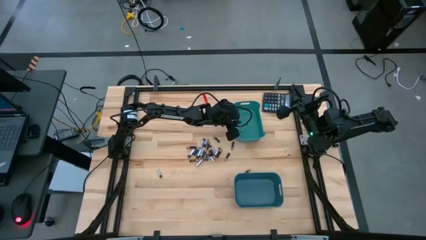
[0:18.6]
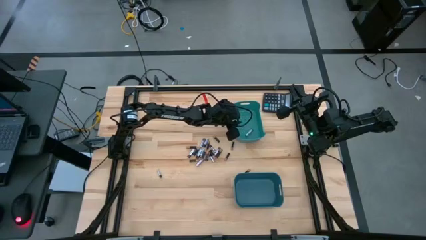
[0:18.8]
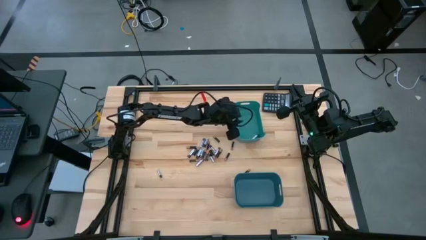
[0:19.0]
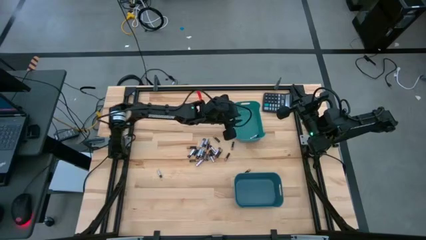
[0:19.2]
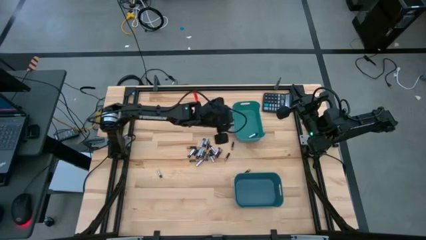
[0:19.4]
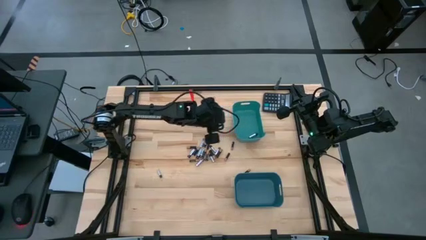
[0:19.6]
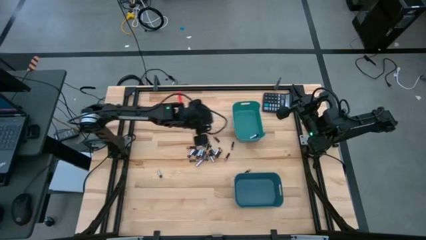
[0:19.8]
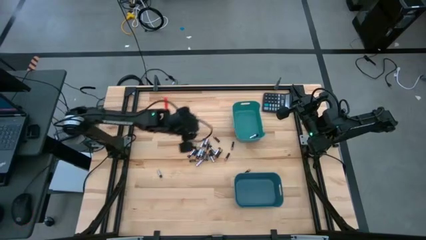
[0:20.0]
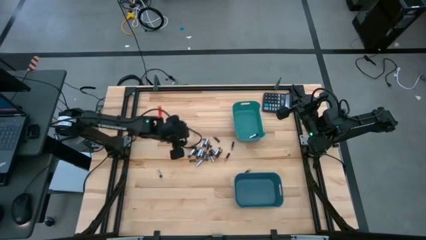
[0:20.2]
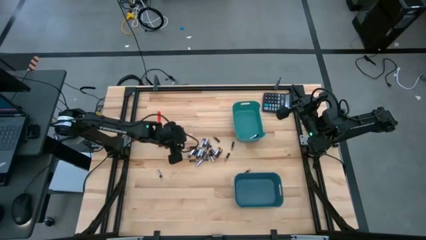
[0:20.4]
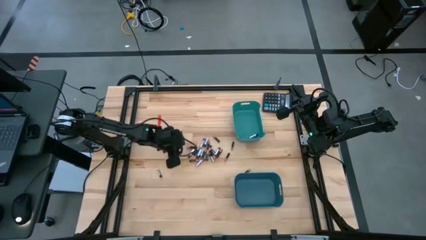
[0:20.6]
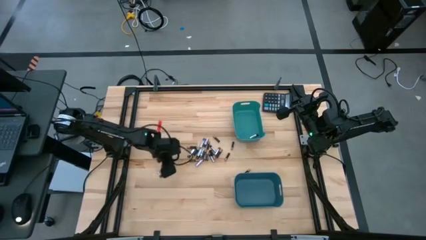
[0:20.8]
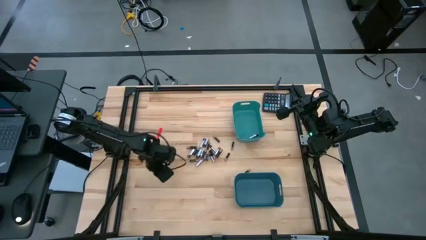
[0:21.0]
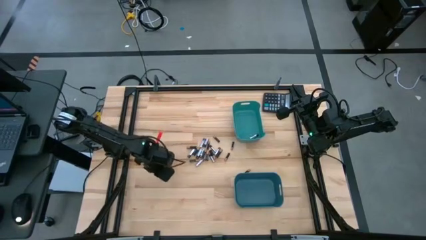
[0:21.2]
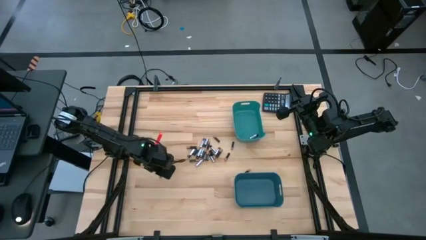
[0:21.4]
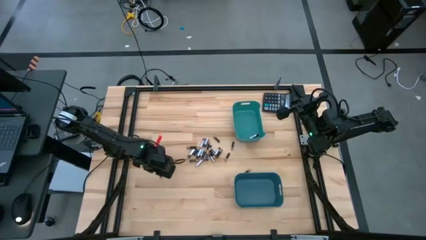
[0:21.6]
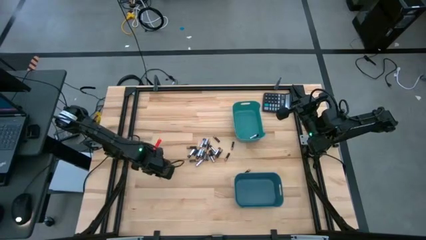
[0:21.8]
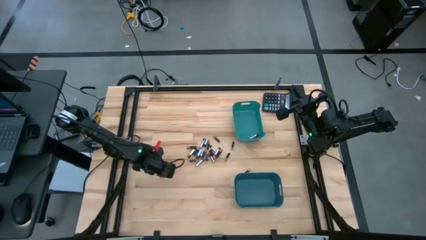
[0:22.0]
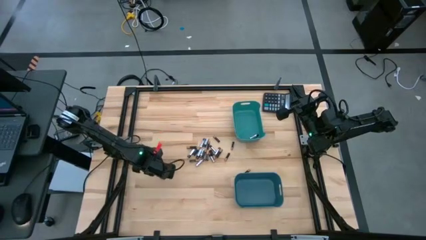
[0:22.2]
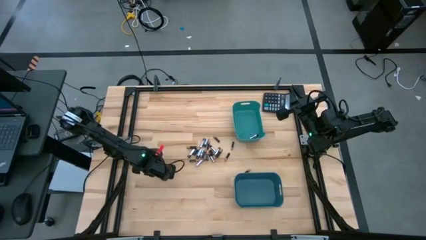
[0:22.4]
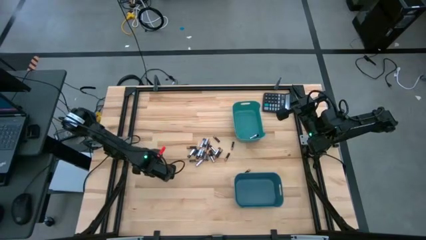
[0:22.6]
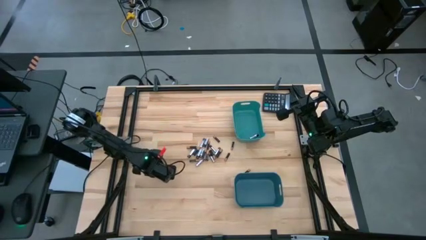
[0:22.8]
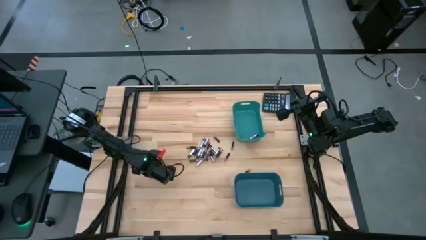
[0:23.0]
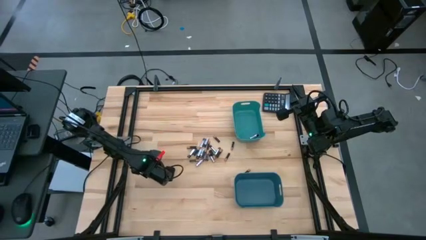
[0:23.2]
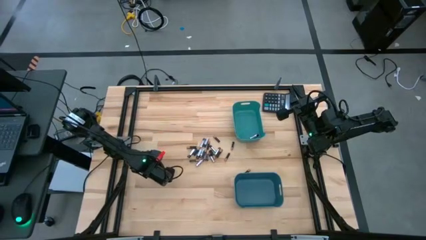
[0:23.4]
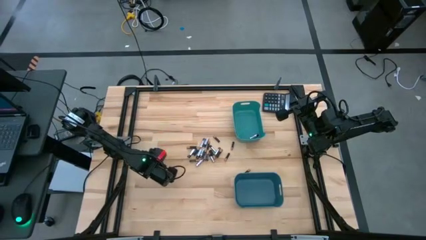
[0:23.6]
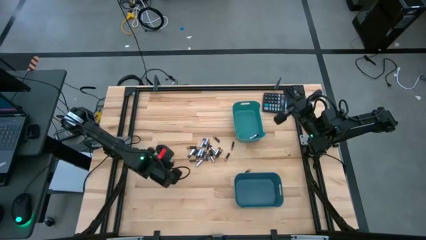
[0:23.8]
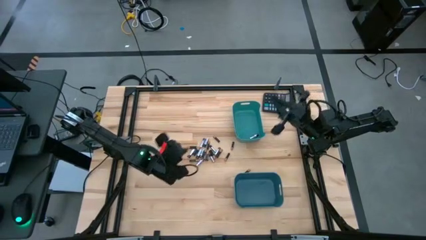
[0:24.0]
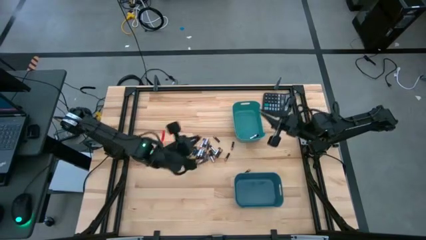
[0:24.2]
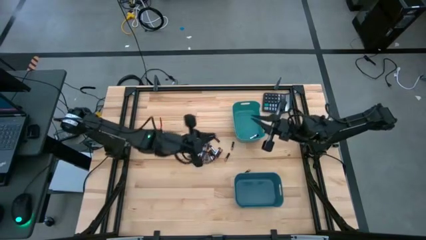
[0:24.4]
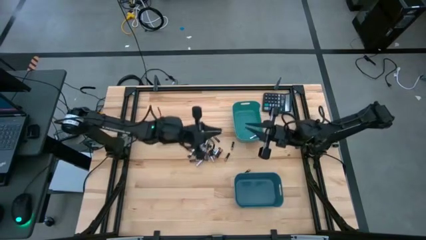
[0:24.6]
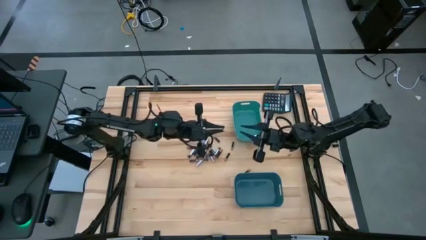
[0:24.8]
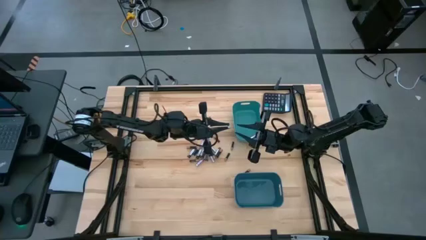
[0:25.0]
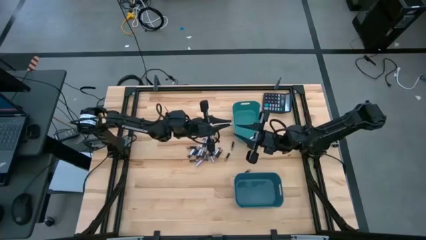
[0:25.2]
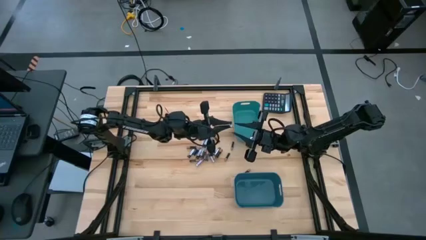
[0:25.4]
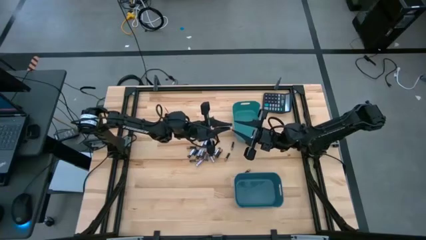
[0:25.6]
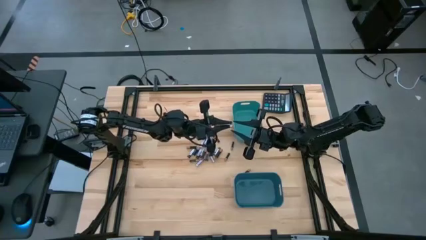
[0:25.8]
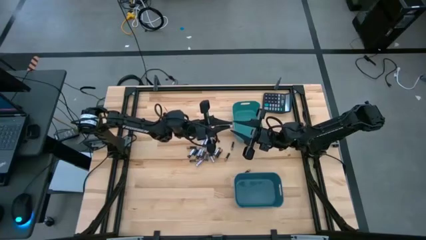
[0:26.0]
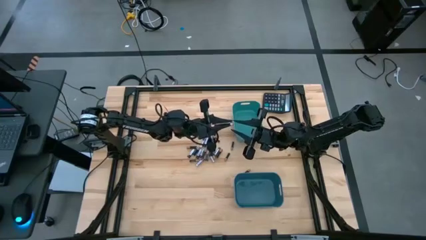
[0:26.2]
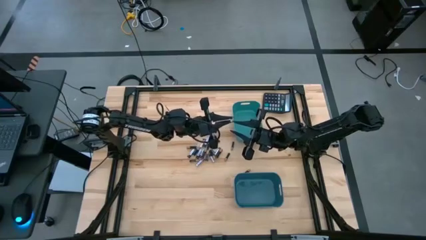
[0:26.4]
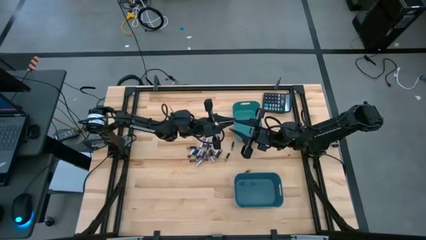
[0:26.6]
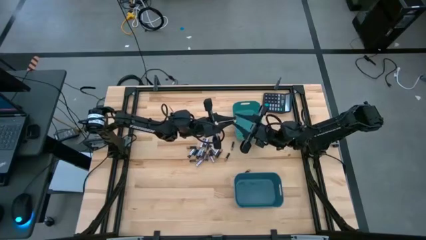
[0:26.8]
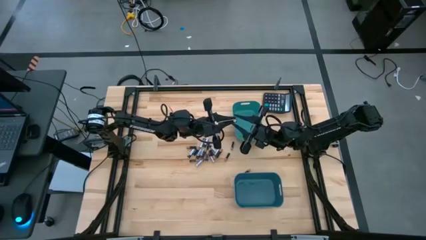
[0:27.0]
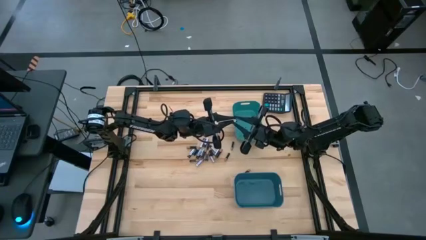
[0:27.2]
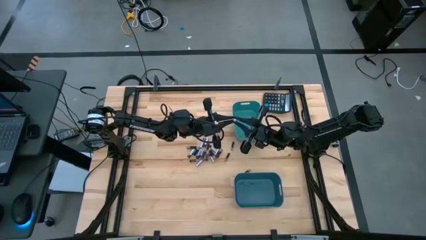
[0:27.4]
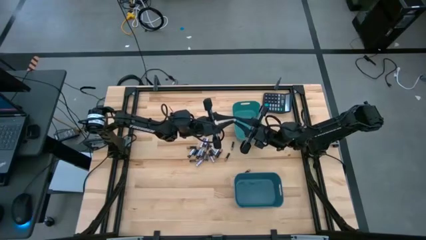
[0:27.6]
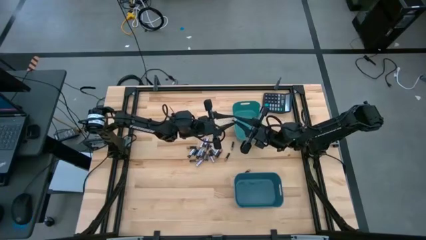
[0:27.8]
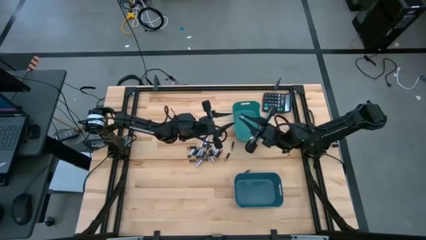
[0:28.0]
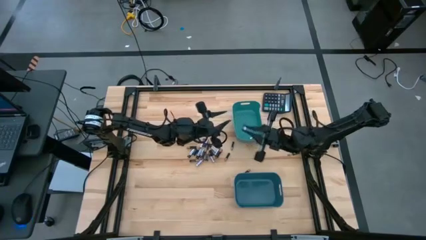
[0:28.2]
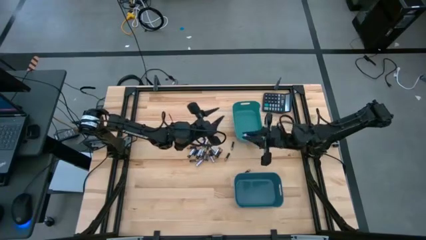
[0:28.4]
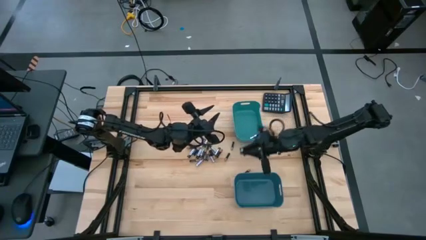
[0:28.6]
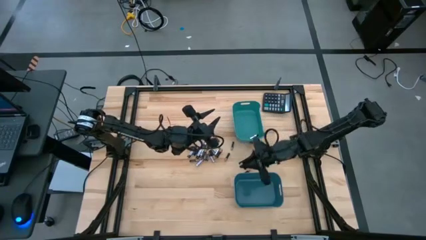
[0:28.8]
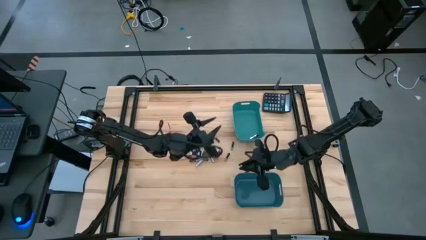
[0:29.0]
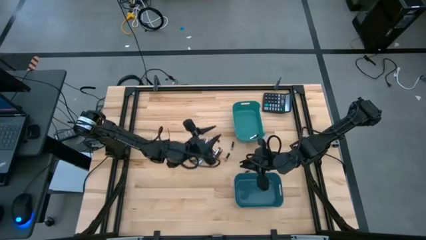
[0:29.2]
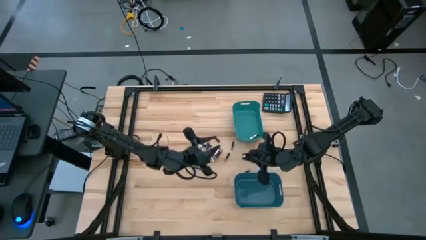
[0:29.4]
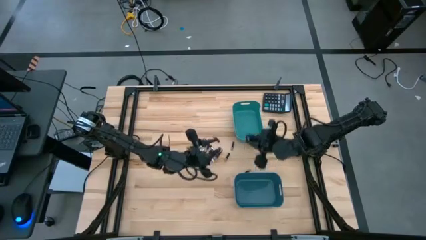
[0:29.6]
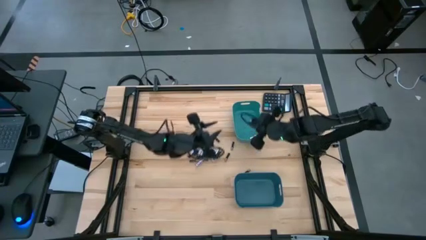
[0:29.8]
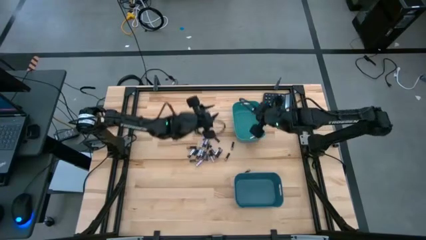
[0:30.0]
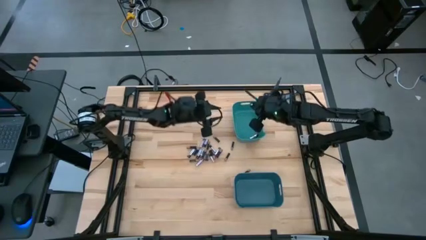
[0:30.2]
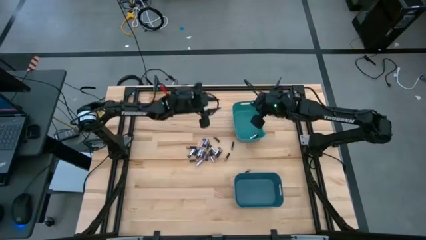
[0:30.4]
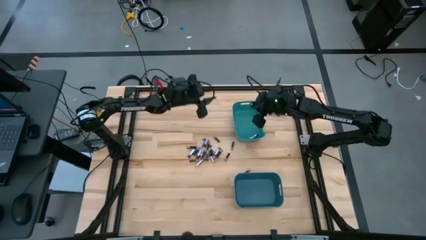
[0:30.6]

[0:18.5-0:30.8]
Task: Sort batteries
Put the silver battery into the green bin

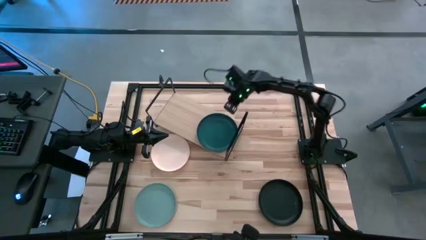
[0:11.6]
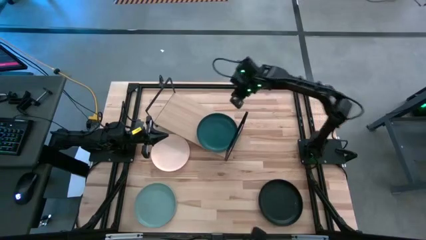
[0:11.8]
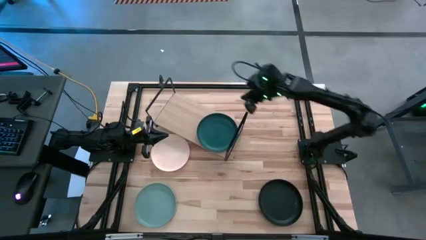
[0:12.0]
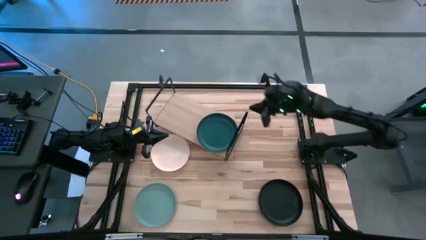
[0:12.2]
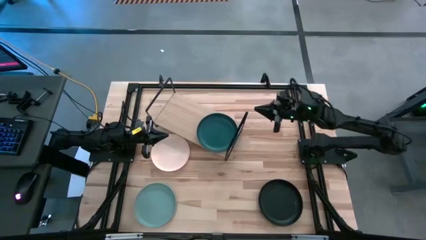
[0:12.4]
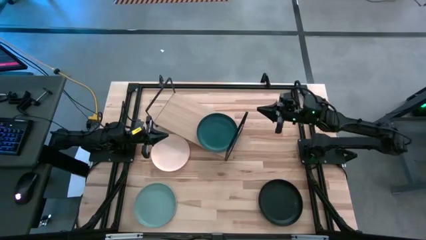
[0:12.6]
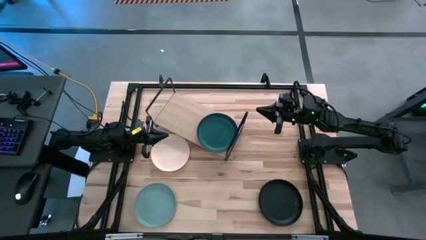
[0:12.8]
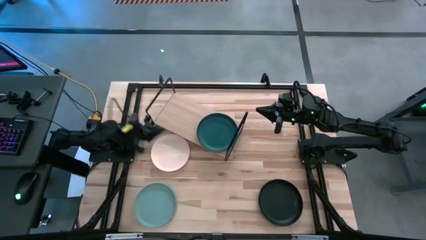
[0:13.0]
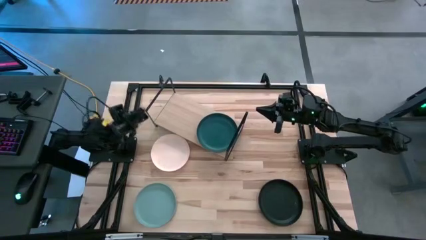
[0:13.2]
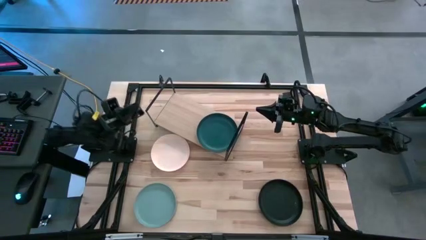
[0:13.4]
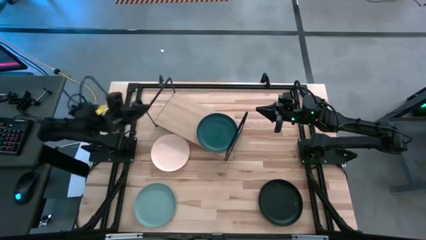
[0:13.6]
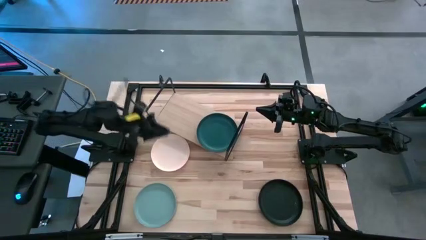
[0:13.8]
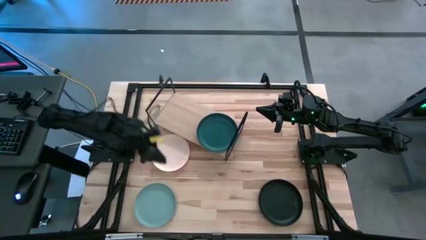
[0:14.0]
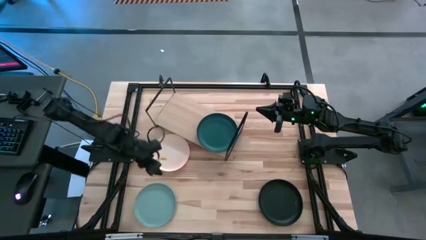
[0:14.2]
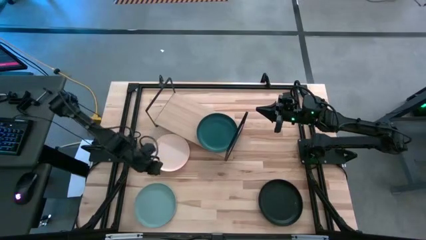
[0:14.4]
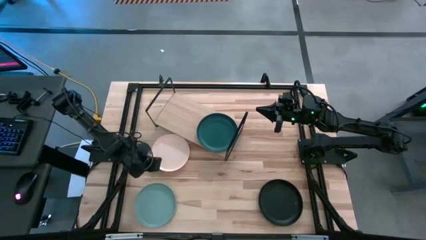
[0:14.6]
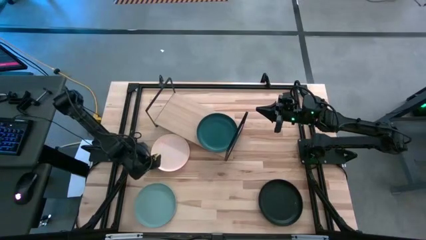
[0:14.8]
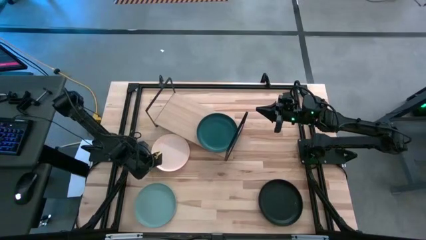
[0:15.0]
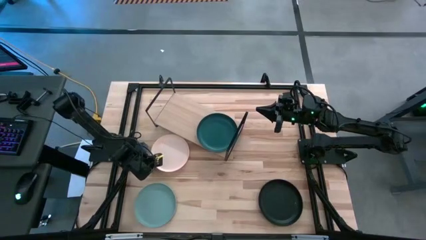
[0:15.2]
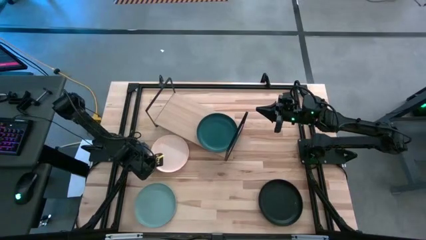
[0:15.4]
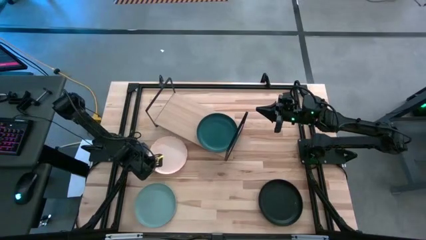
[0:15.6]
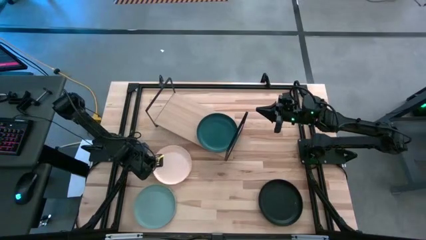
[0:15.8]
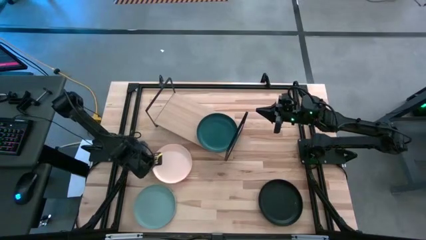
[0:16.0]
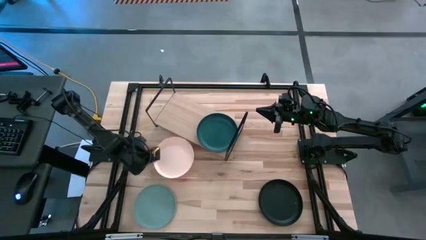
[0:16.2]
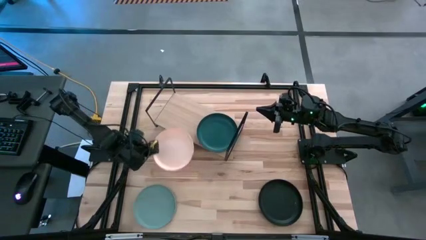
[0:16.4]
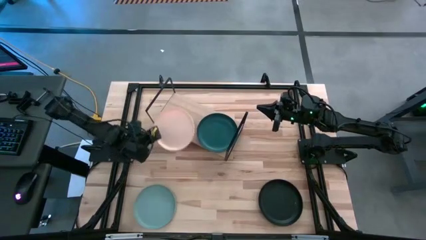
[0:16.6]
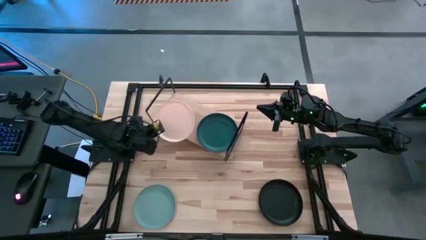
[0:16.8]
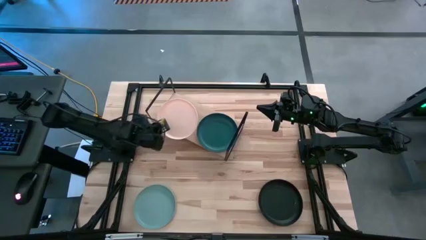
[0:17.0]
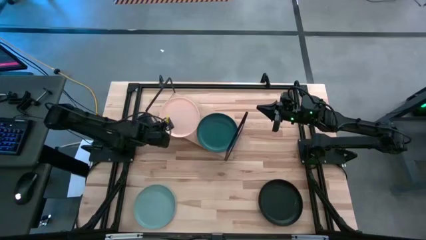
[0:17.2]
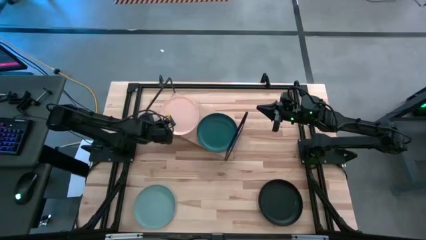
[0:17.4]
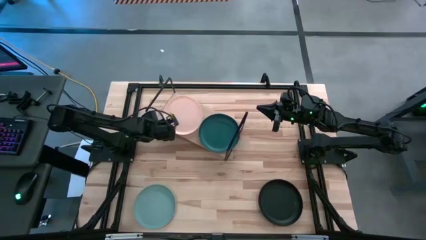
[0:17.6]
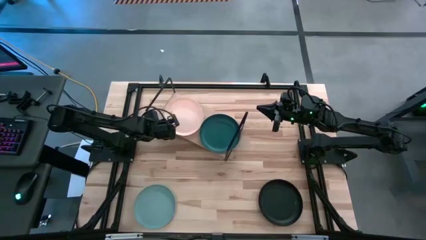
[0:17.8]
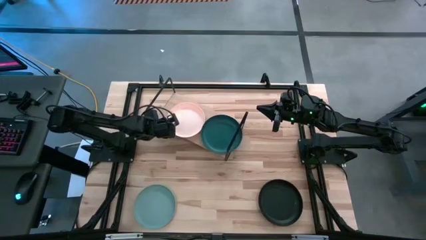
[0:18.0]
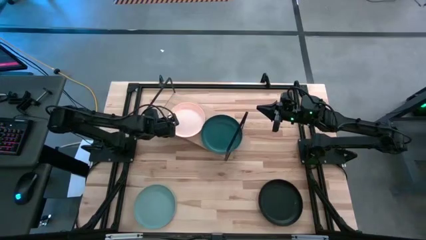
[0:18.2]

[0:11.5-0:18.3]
Task: Place and stack plates onto a shelf
Put the pink plate on the shelf
